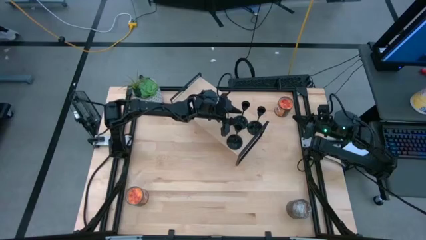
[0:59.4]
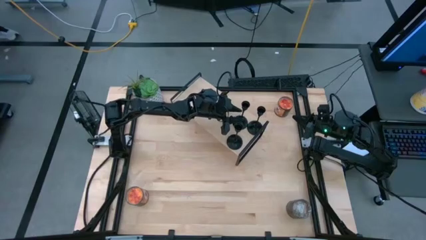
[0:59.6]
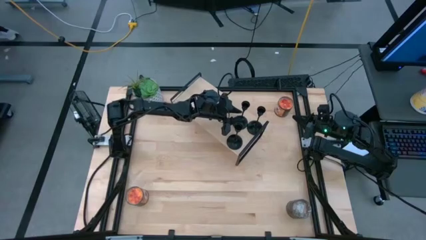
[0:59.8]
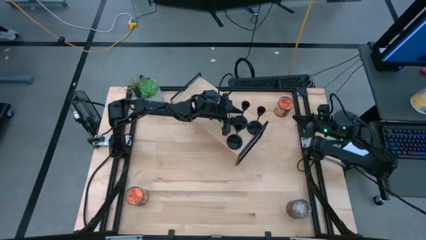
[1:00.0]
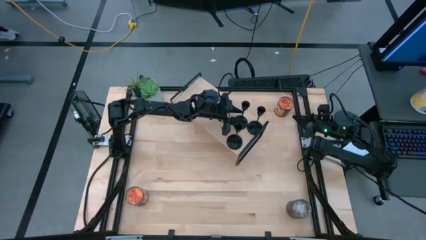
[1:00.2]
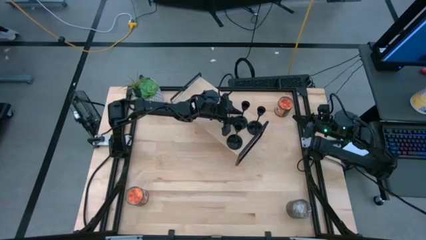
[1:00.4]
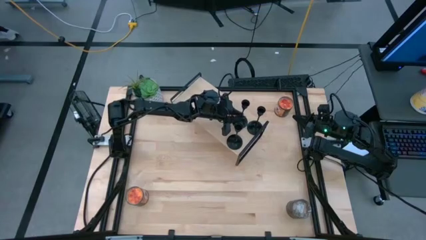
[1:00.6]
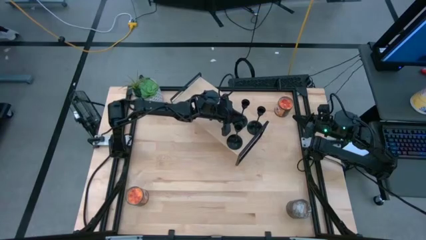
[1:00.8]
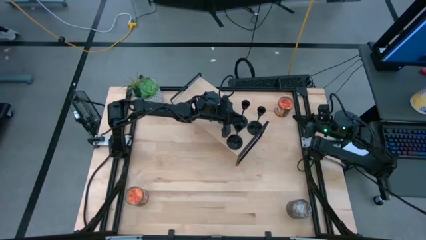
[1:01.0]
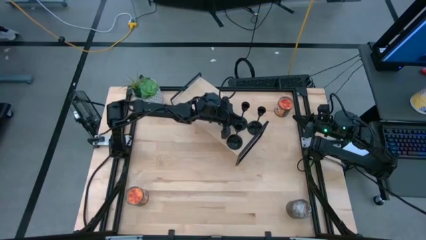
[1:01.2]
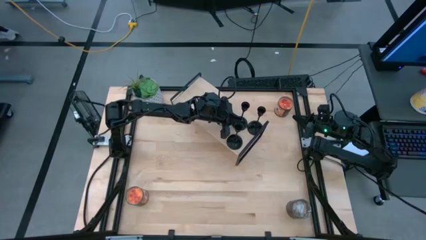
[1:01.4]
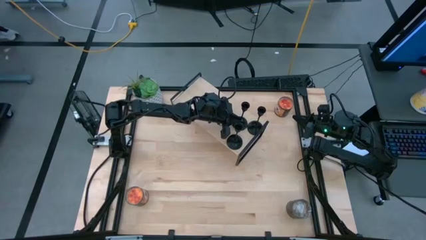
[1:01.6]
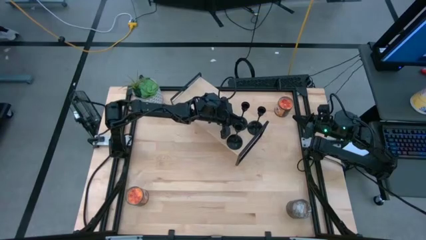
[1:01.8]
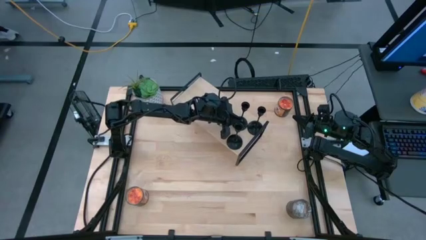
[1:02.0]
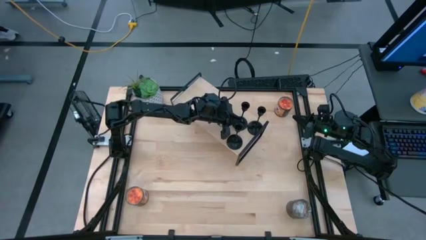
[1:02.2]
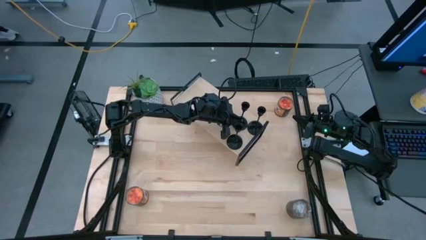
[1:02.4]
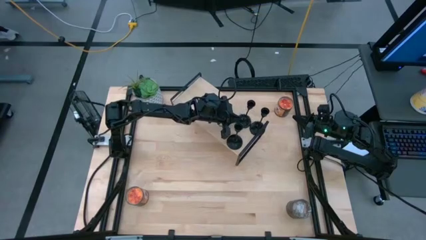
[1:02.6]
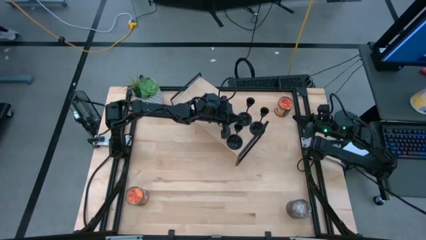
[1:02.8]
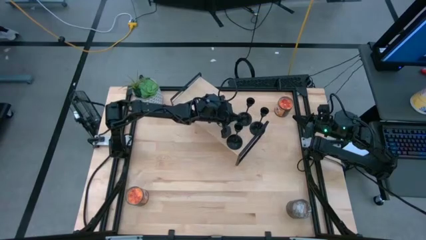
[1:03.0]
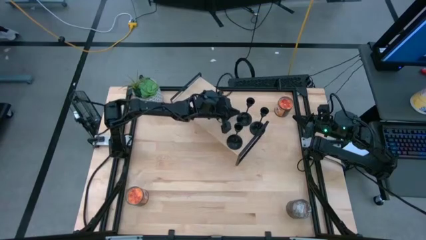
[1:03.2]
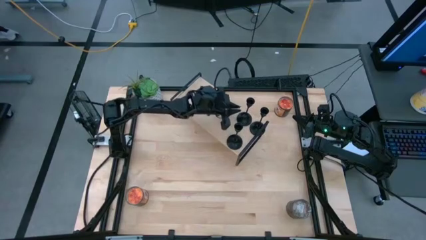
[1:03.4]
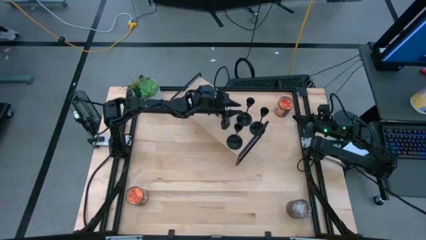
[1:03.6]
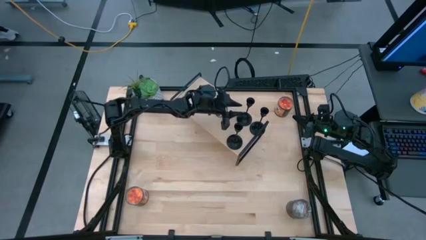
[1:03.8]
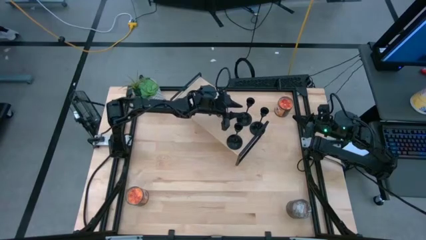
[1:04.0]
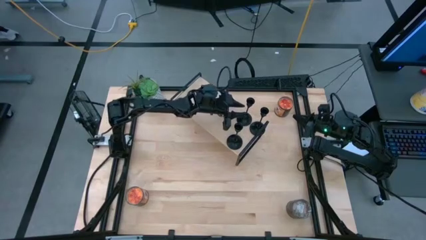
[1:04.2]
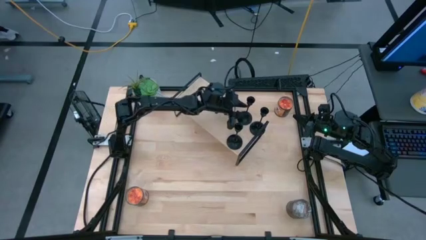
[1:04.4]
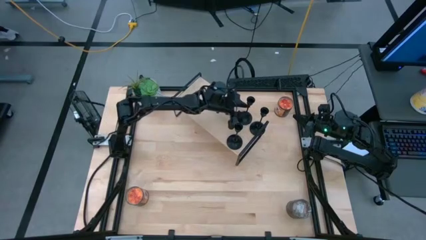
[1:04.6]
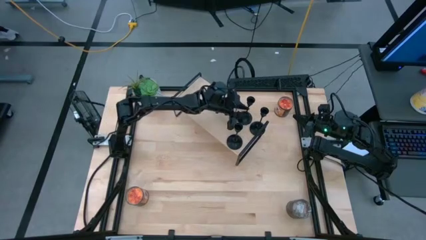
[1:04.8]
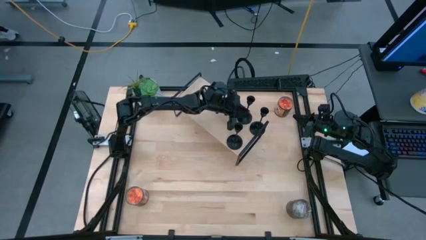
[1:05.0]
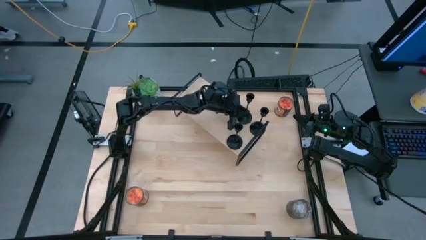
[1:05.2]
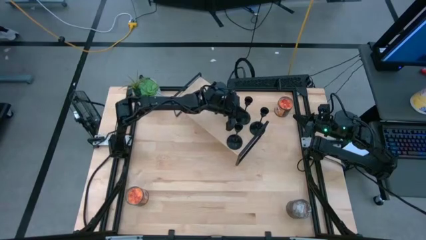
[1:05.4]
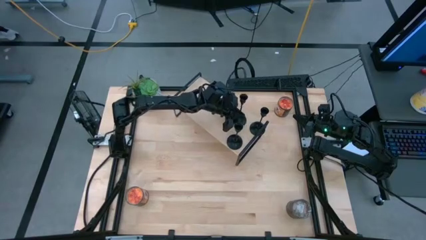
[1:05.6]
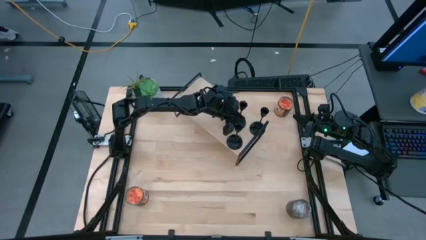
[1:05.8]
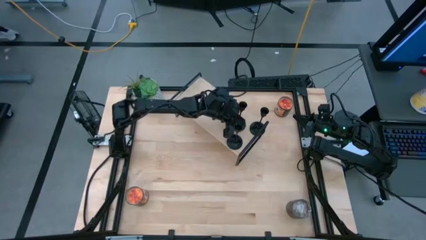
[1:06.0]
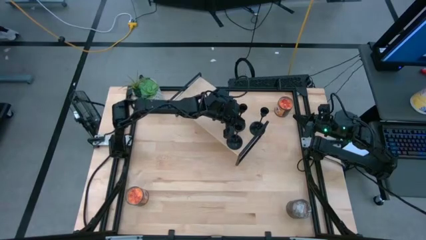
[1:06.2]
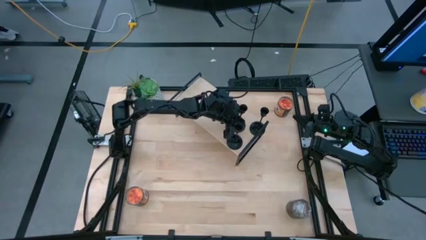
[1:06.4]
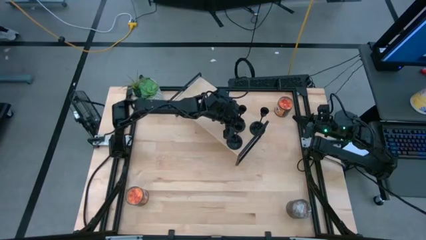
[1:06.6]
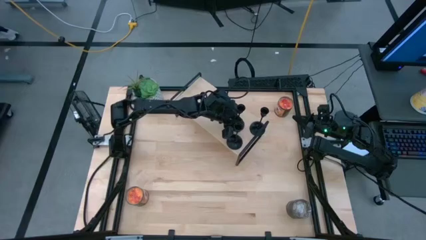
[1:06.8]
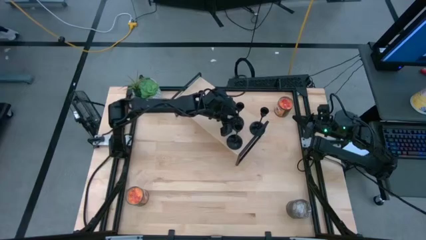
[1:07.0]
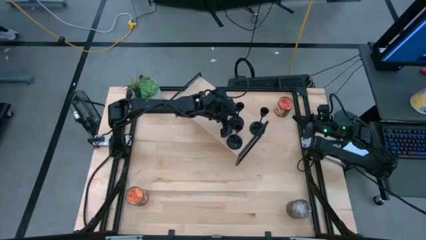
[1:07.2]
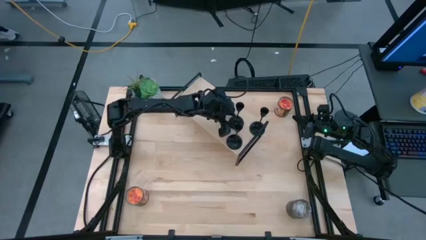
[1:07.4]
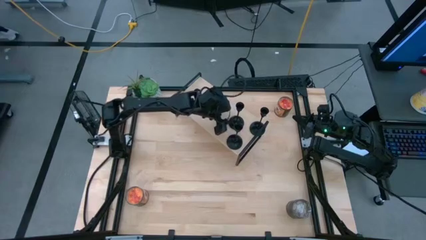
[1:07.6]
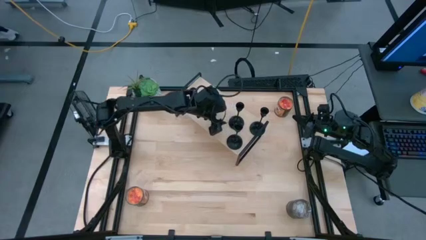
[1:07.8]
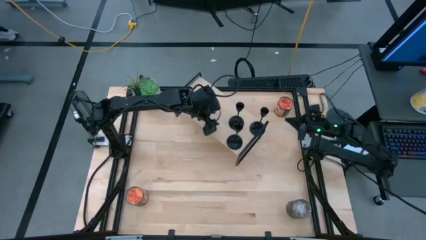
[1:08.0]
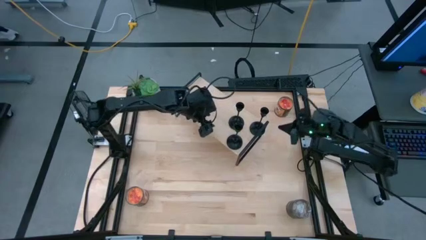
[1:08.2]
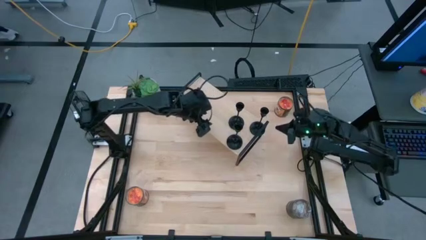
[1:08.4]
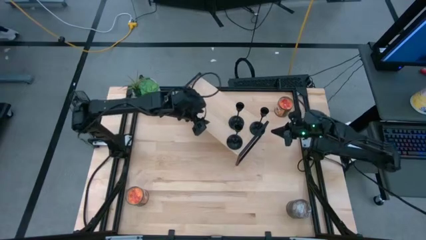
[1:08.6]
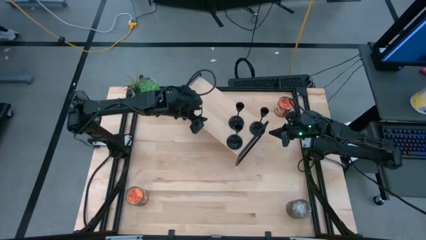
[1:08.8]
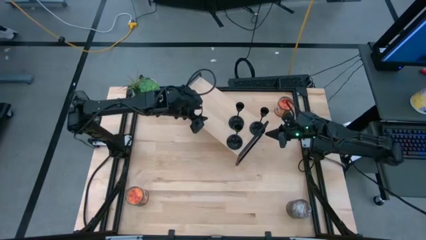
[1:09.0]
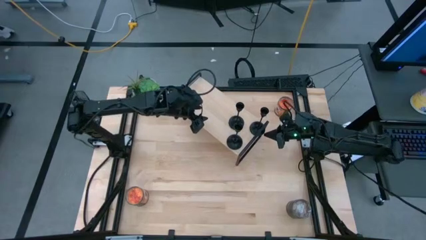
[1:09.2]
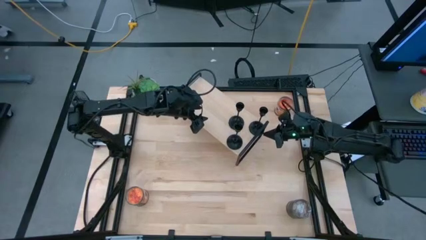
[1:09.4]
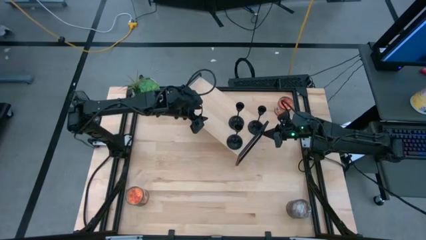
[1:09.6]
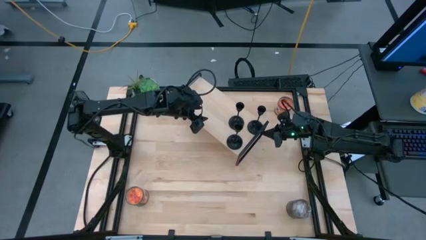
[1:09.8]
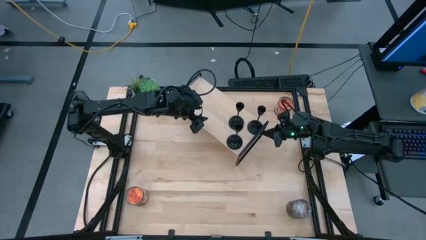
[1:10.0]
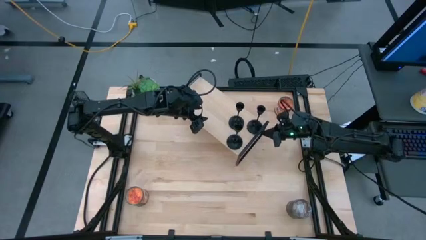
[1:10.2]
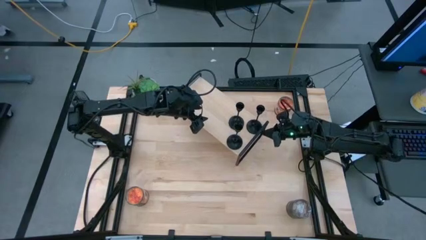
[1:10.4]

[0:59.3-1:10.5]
Task: Pick & Place candle stick holders
Adjust the black candlestick on the shelf
